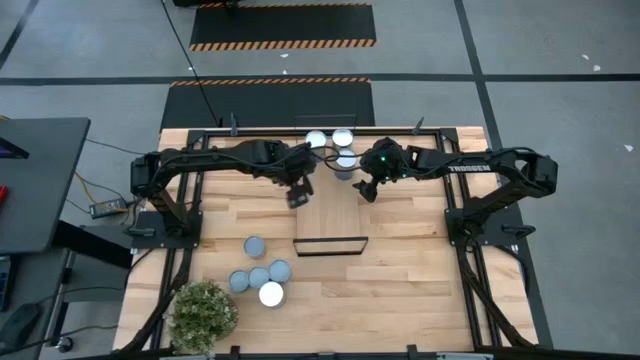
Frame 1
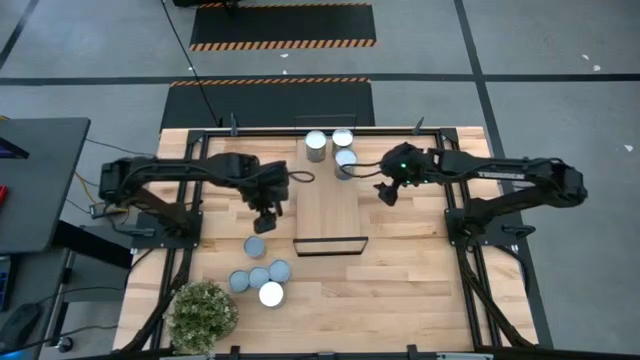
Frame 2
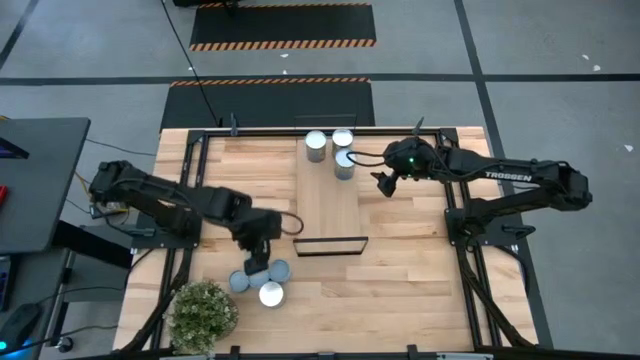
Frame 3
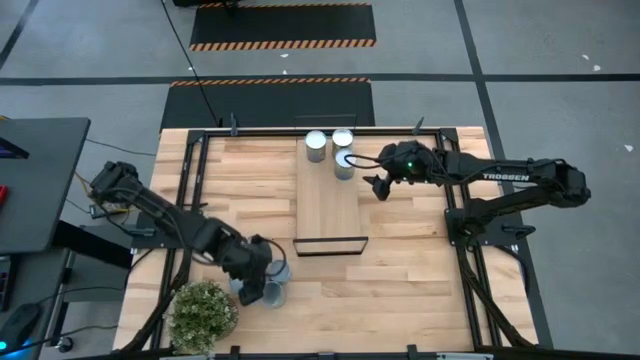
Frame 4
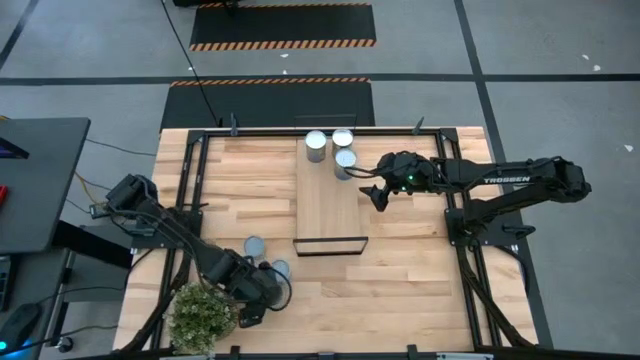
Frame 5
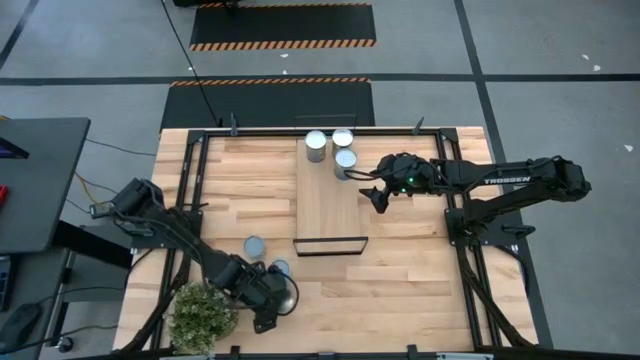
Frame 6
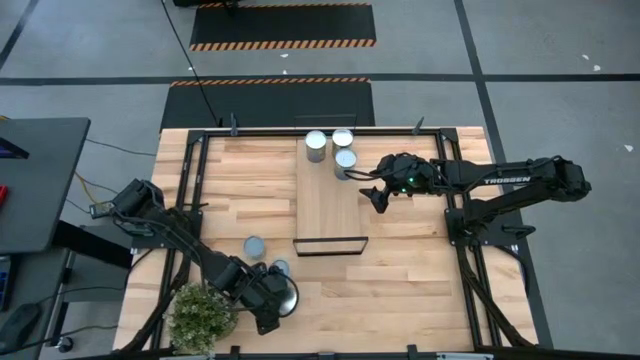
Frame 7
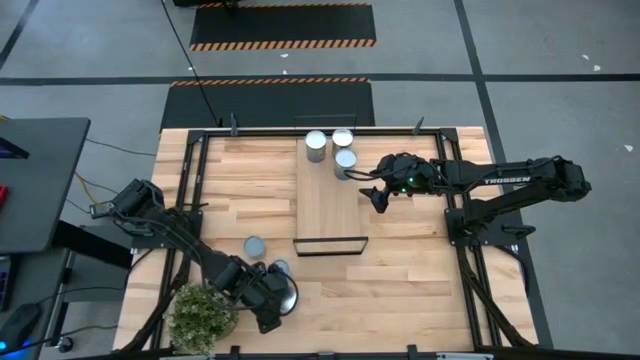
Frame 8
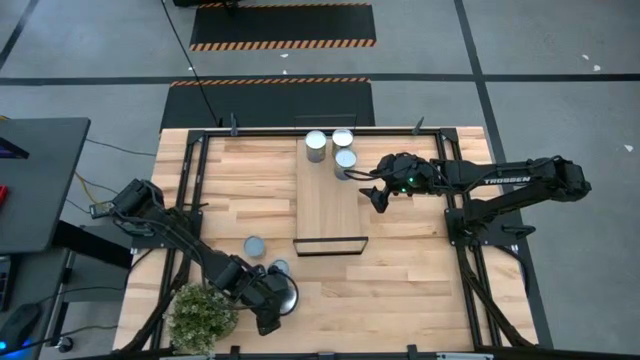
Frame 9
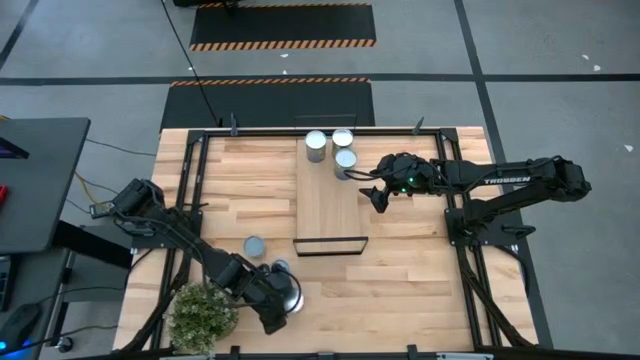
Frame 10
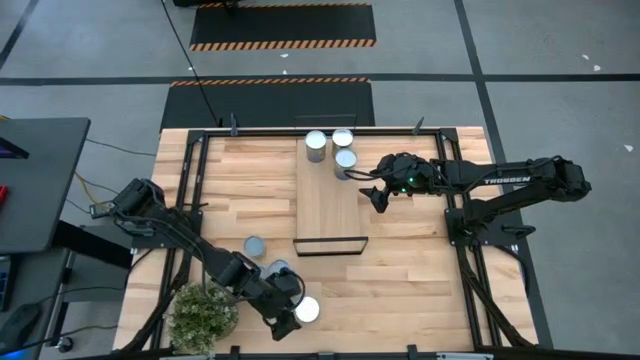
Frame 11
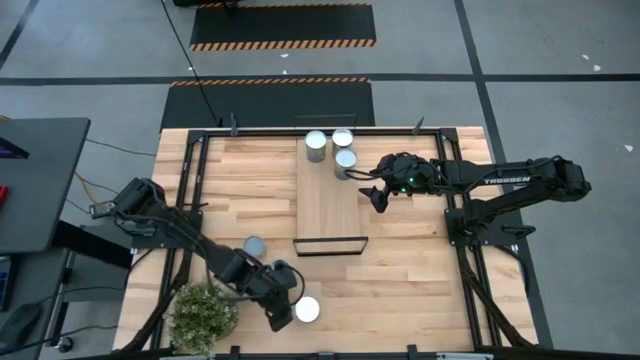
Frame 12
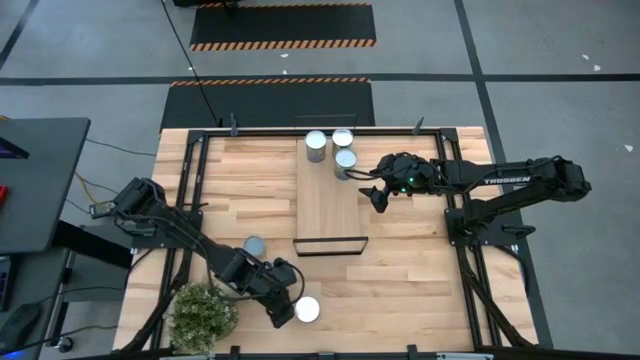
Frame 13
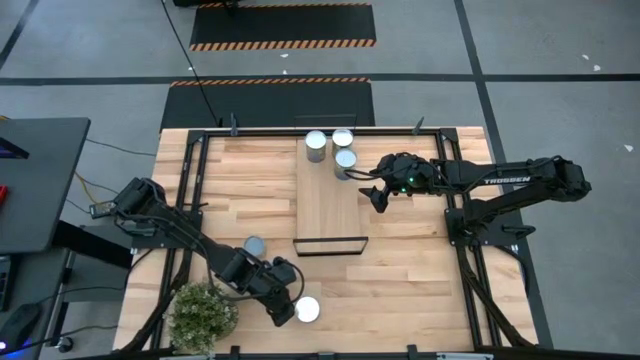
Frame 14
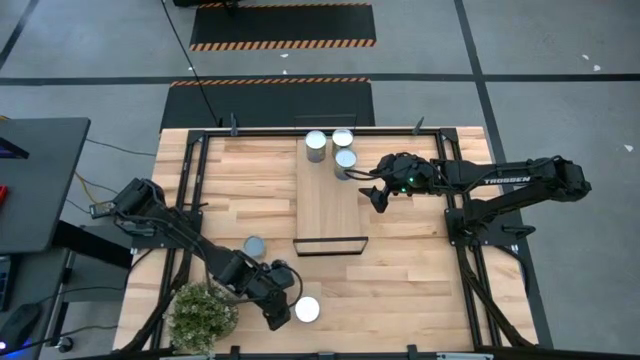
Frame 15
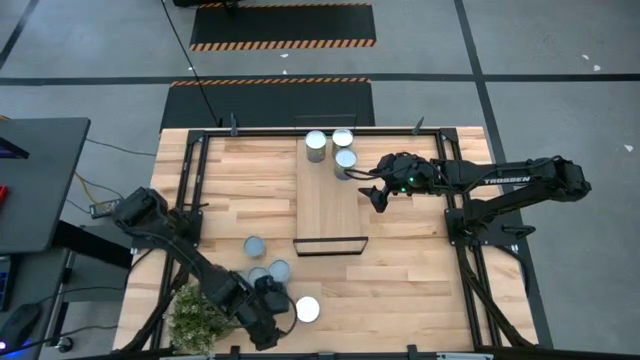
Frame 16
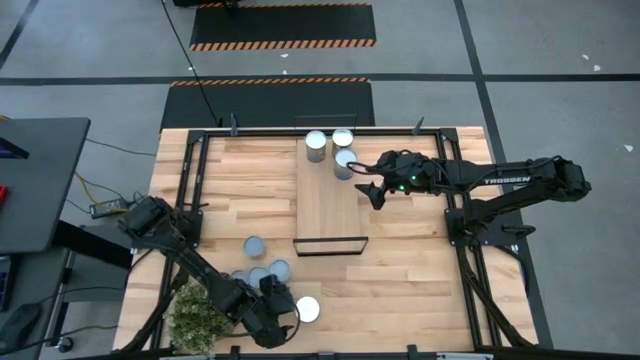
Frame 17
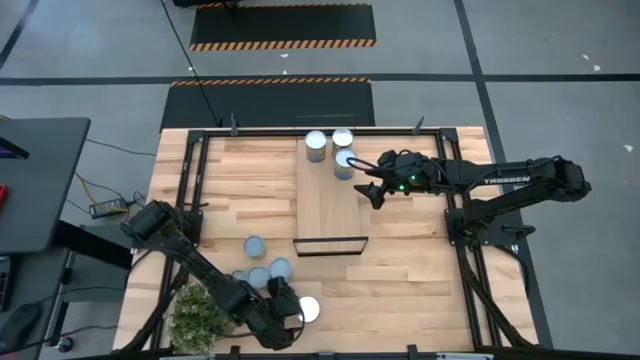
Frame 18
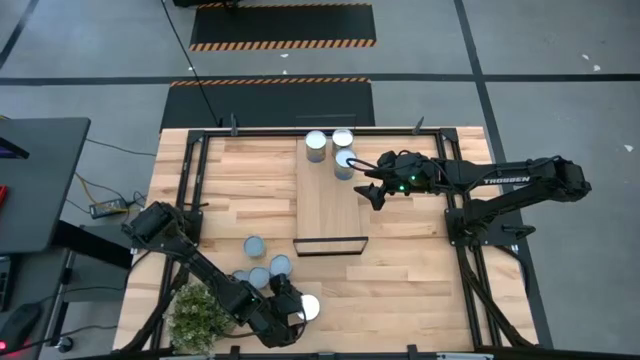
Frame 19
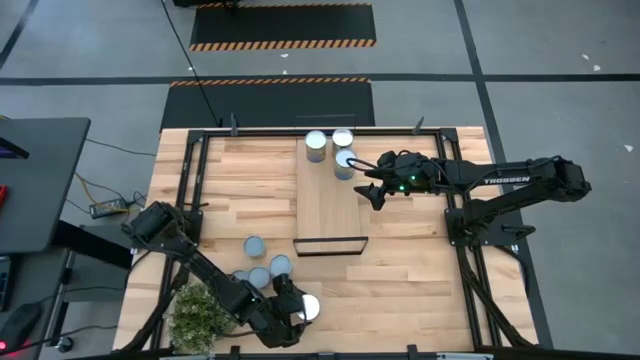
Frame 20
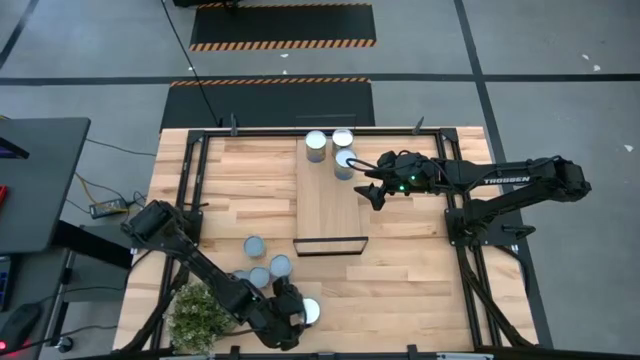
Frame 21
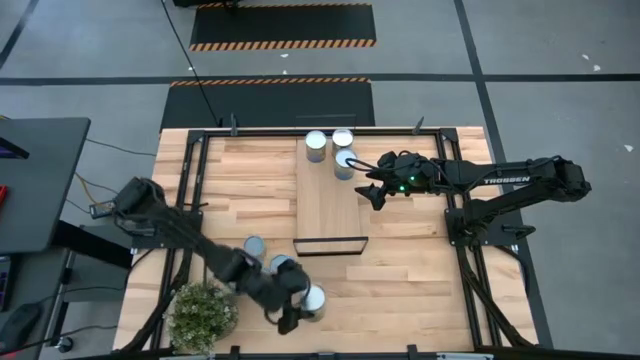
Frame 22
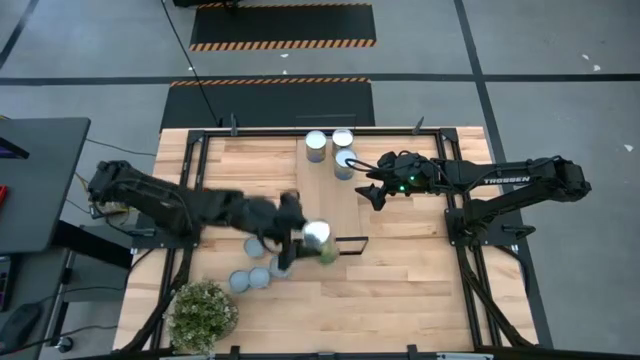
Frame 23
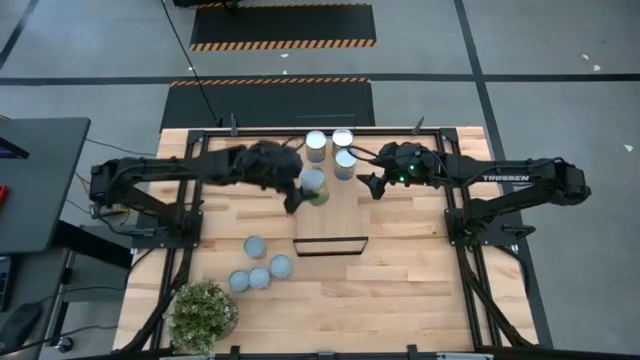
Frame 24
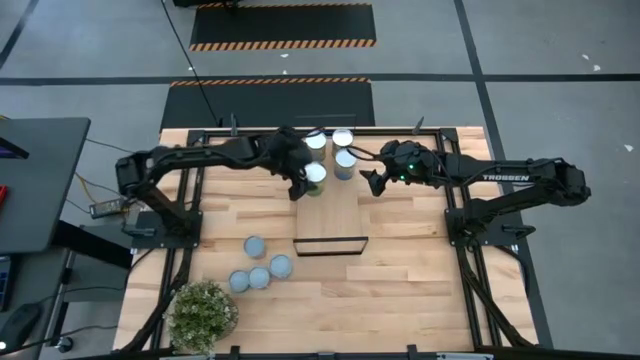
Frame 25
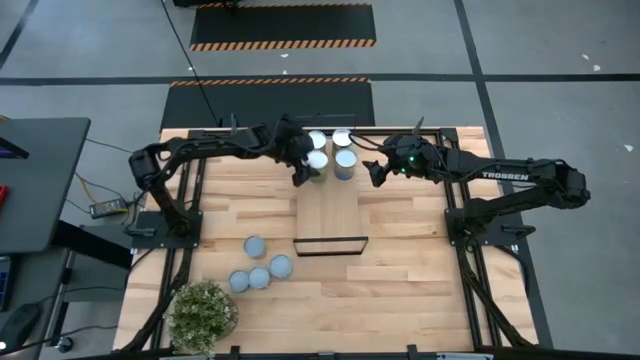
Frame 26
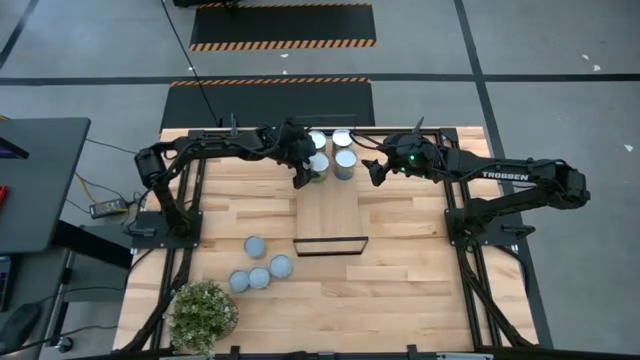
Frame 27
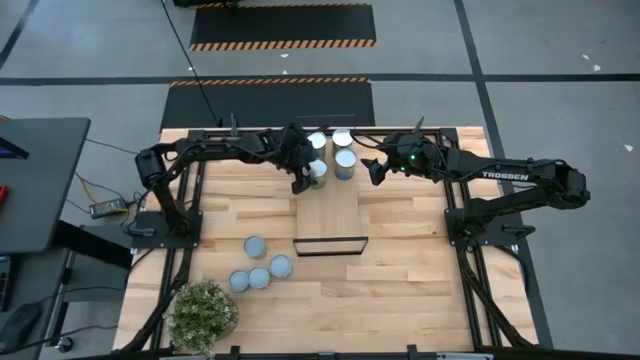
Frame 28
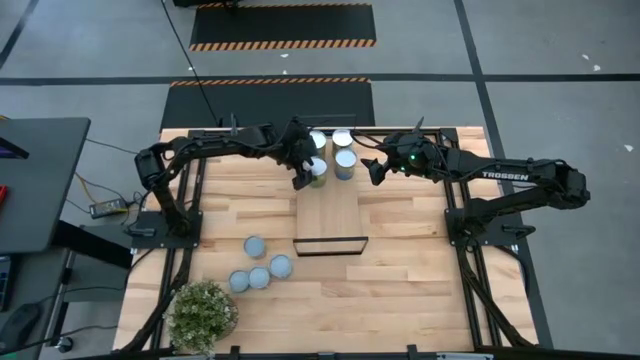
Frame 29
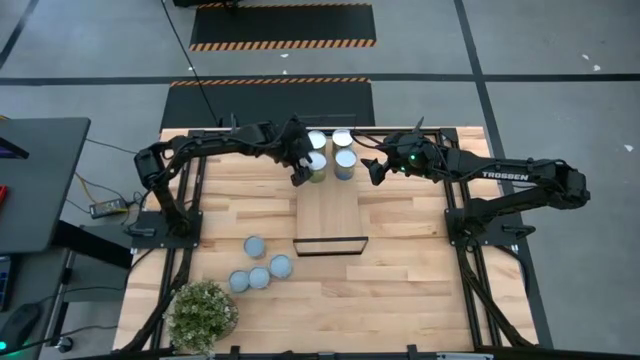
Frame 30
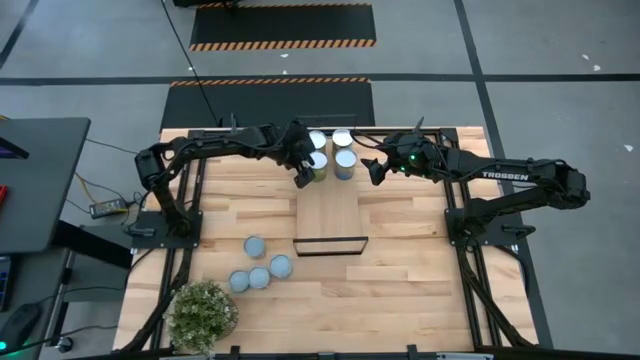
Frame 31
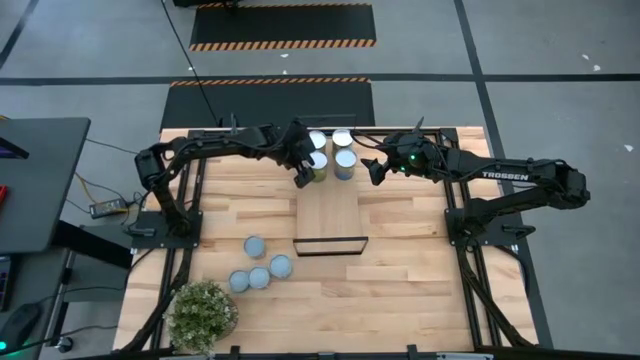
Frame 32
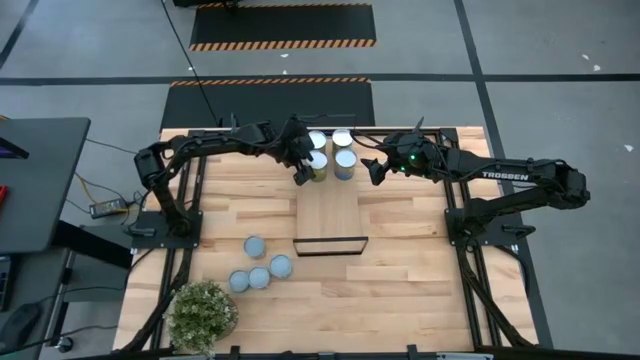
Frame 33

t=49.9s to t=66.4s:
Task: Pick and place cans onto a shelf
Put the canned oranges on the shelf

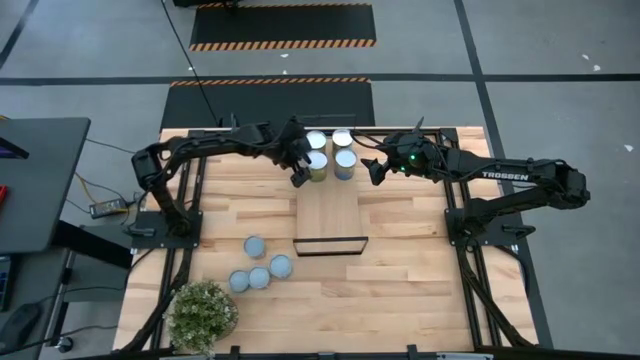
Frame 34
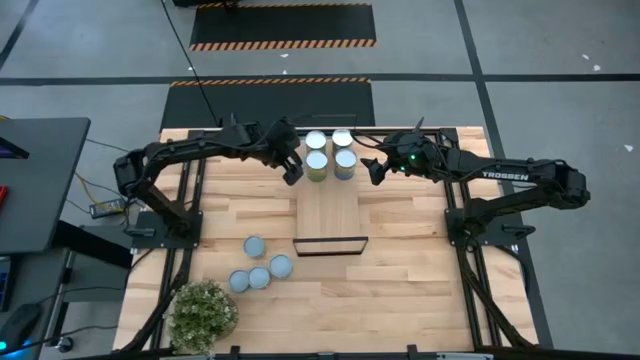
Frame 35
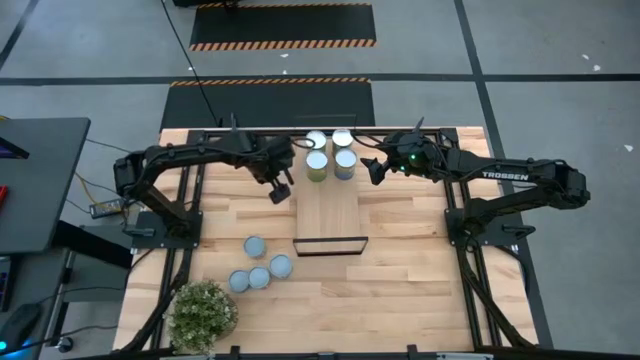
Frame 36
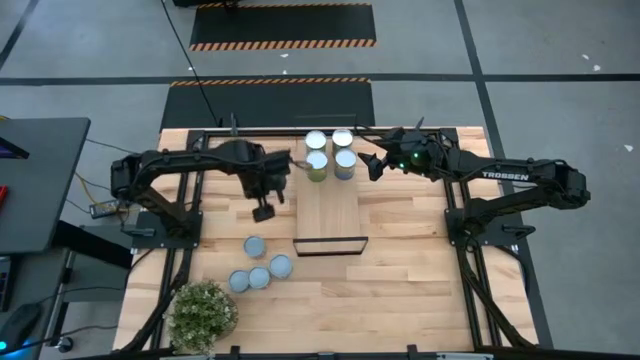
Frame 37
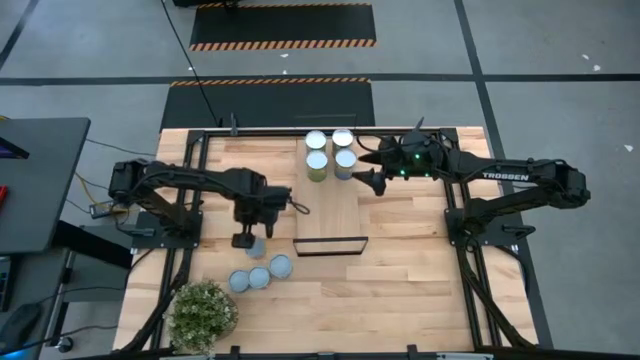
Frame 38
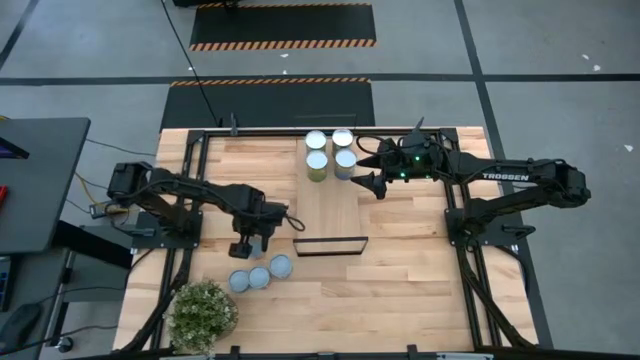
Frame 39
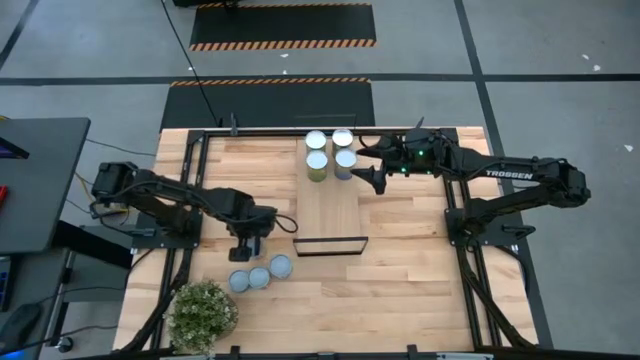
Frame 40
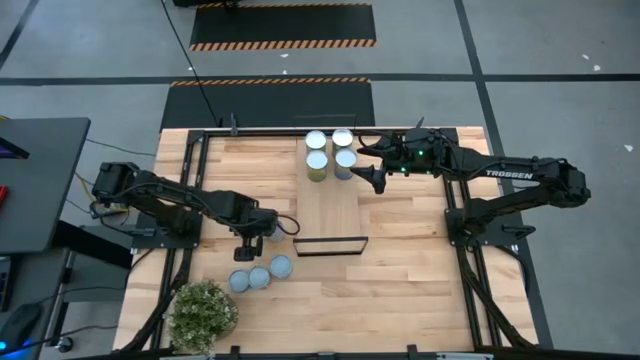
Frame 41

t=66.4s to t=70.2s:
Put the canned green peas on the shelf

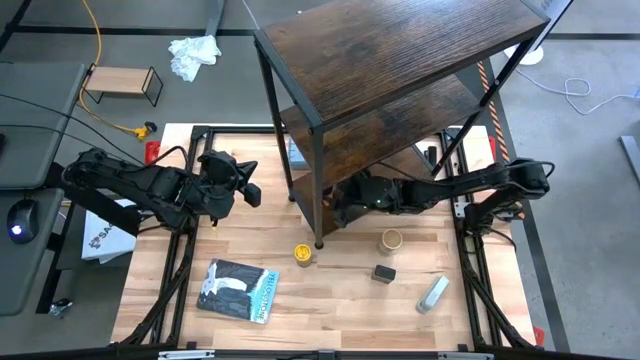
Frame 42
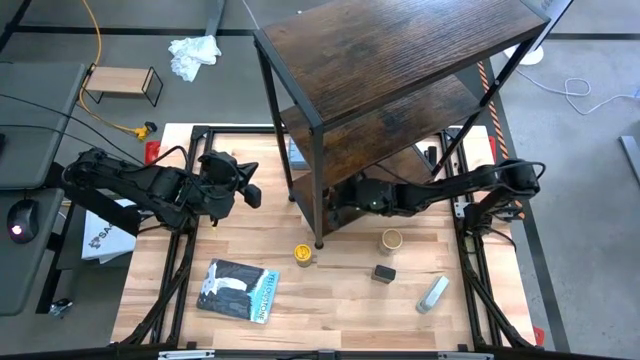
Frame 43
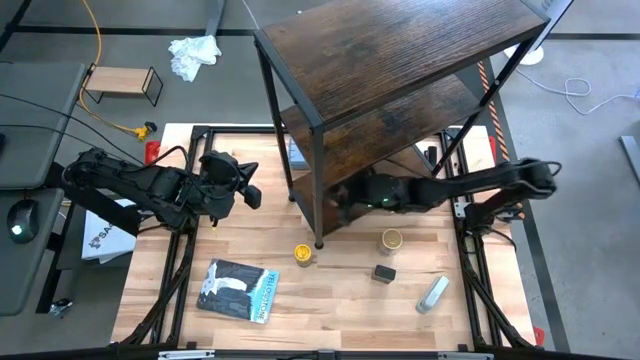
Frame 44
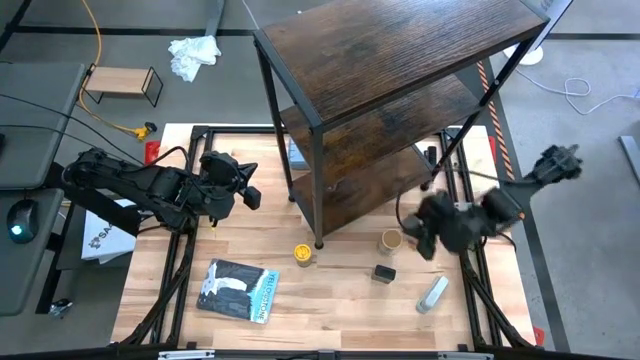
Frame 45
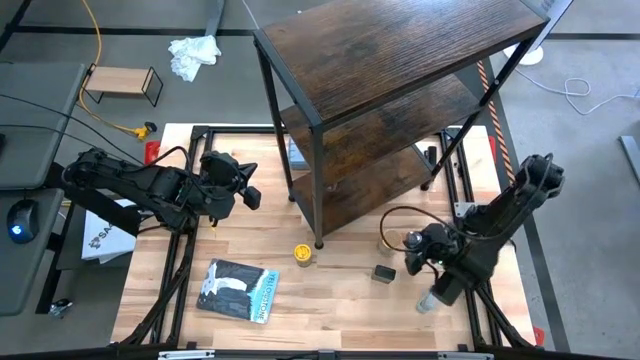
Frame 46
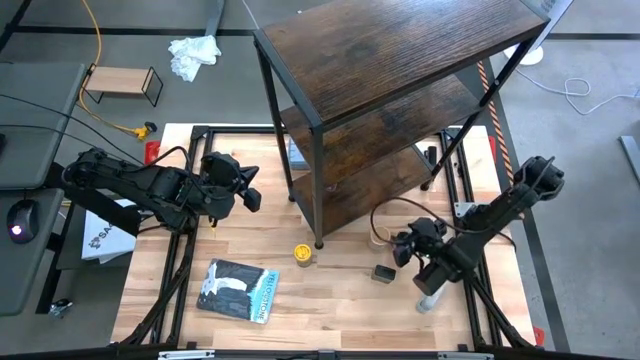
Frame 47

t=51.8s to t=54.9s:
Task: Shelf spices
Remove the orange seasoning bottle from the shelf
